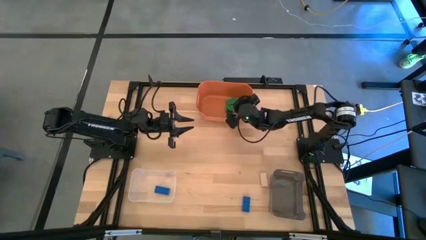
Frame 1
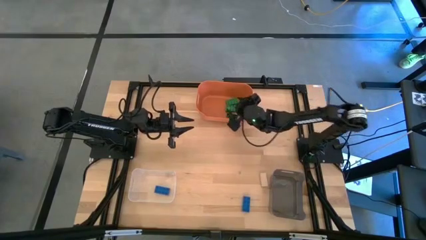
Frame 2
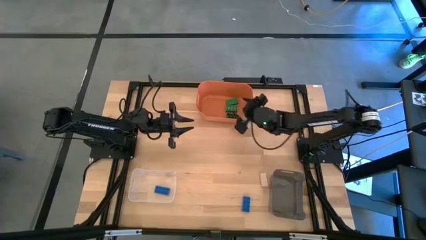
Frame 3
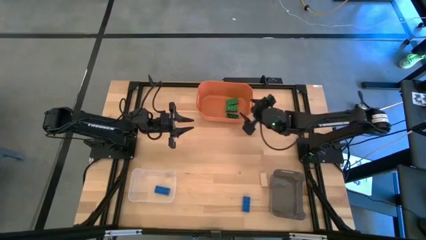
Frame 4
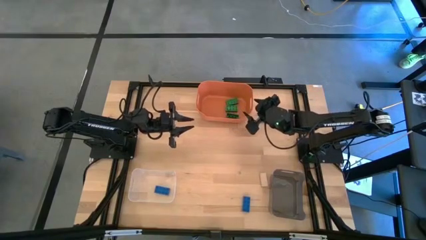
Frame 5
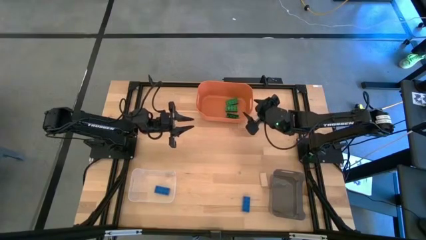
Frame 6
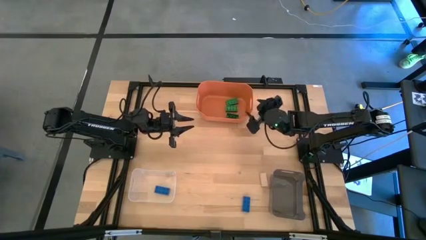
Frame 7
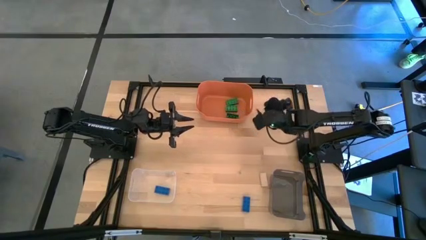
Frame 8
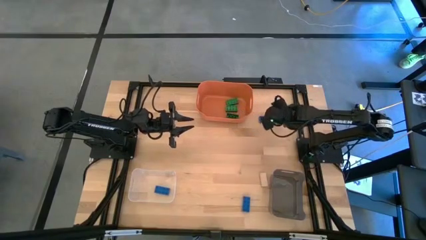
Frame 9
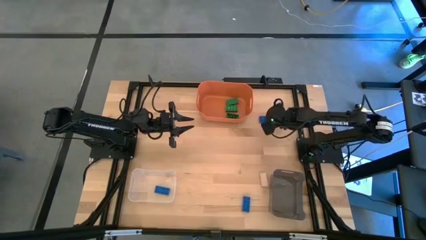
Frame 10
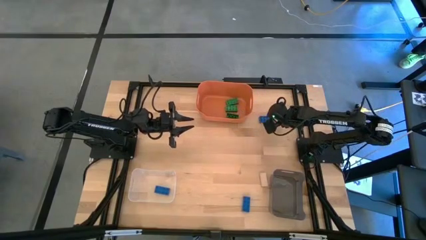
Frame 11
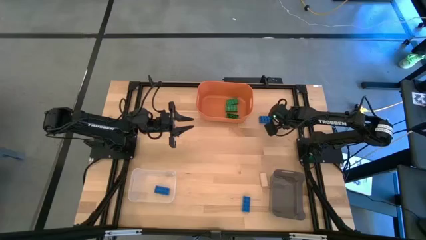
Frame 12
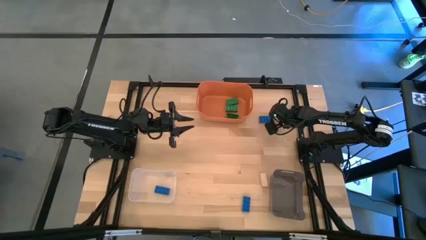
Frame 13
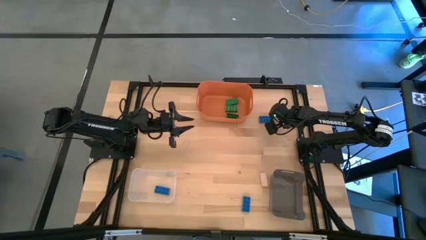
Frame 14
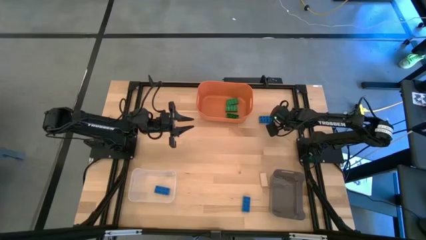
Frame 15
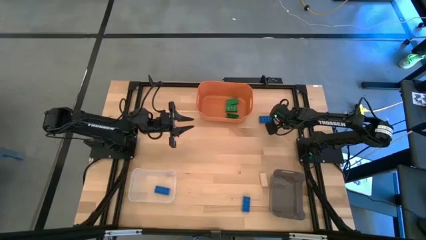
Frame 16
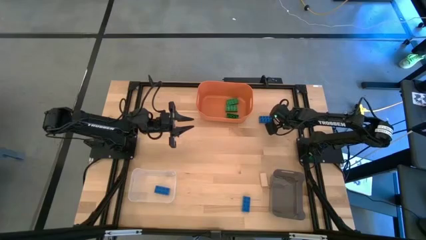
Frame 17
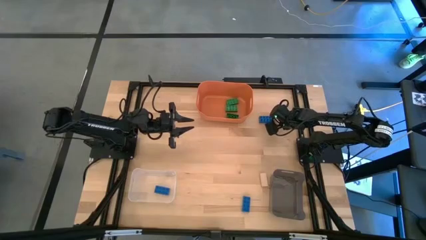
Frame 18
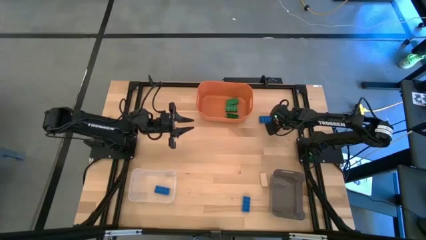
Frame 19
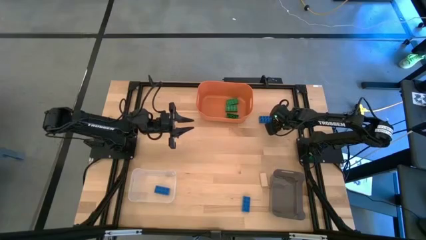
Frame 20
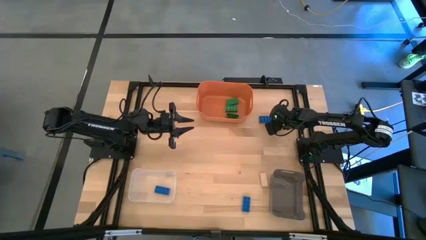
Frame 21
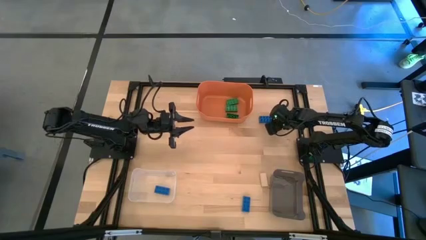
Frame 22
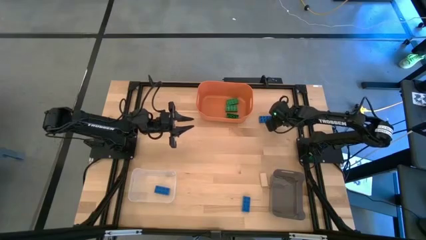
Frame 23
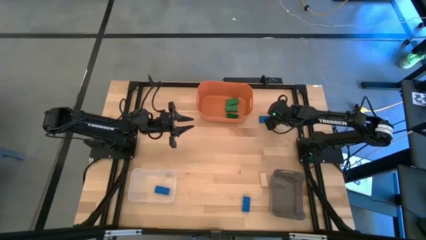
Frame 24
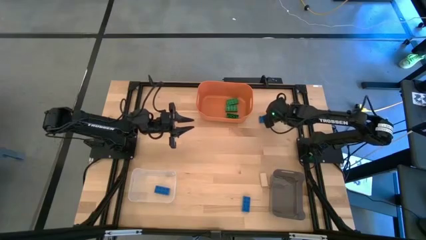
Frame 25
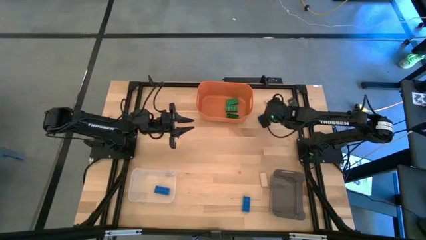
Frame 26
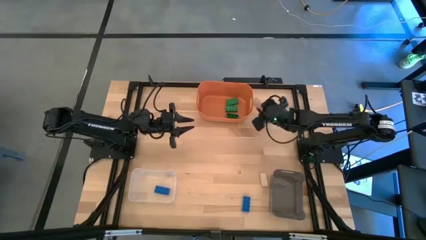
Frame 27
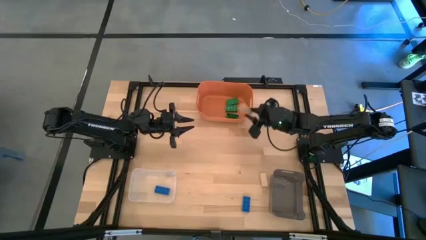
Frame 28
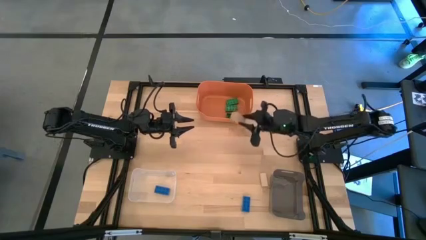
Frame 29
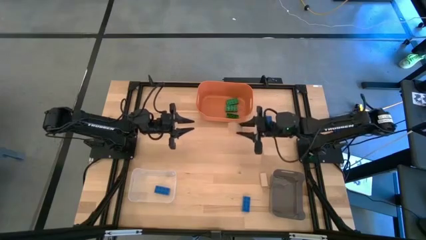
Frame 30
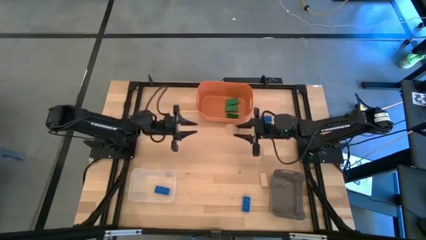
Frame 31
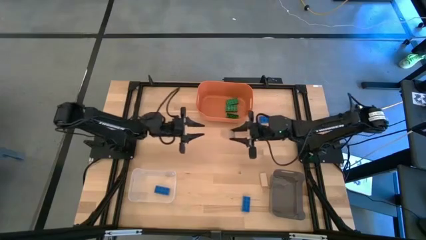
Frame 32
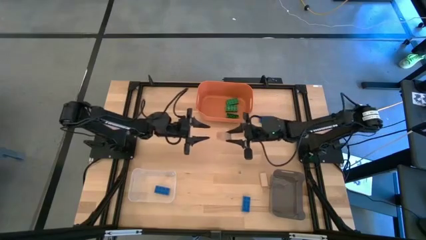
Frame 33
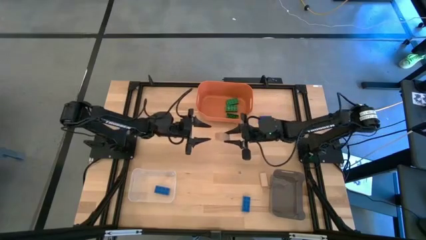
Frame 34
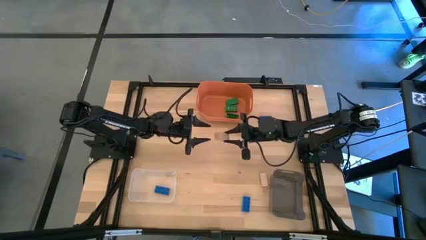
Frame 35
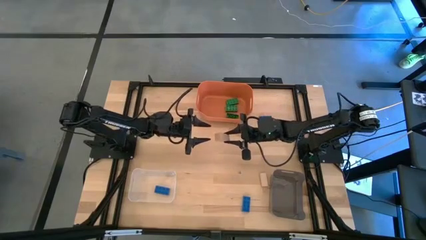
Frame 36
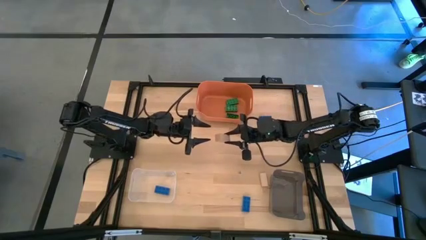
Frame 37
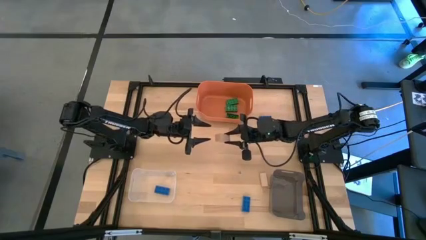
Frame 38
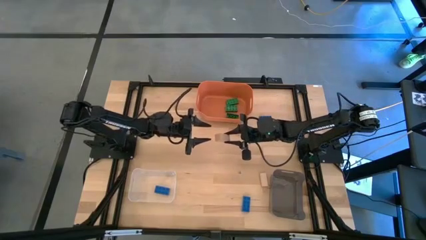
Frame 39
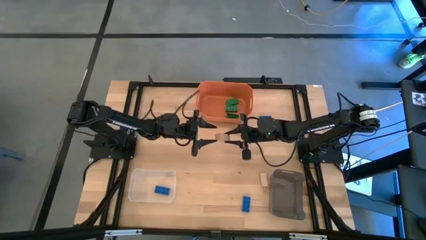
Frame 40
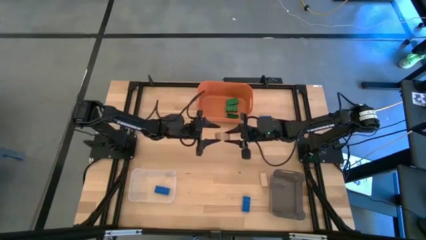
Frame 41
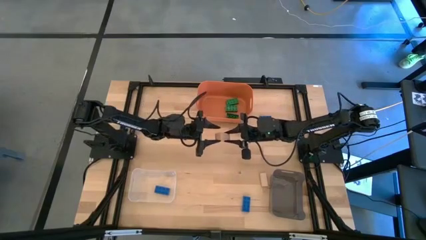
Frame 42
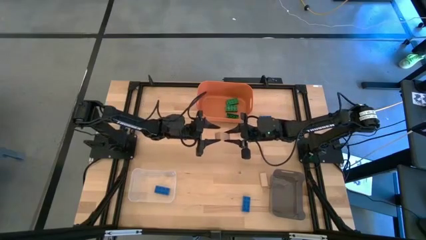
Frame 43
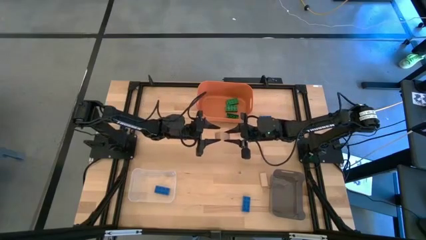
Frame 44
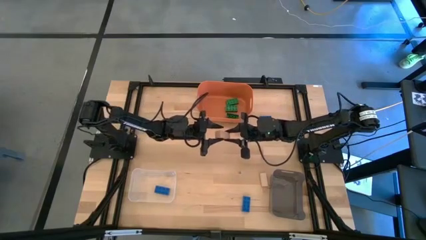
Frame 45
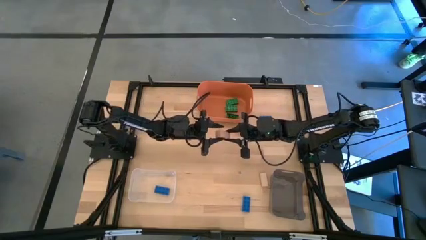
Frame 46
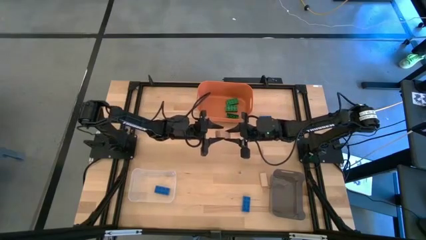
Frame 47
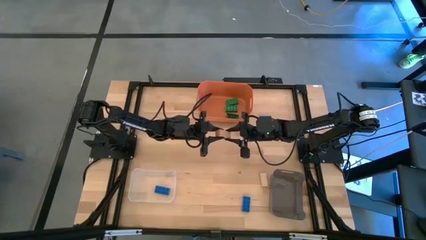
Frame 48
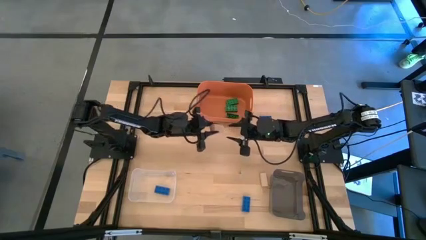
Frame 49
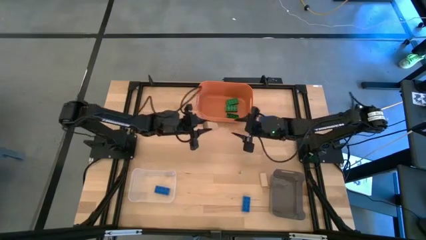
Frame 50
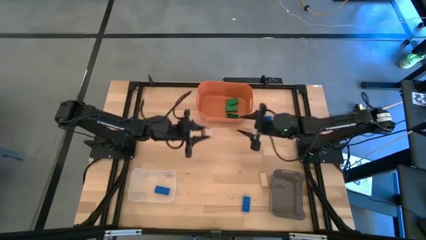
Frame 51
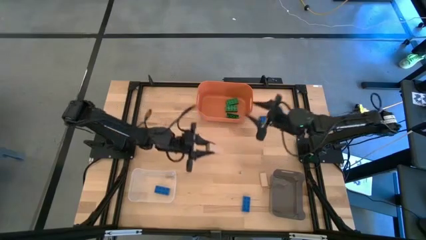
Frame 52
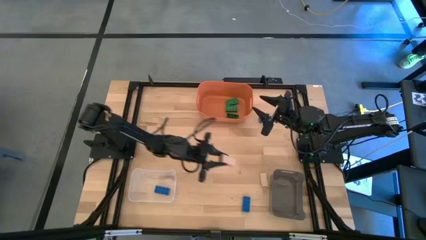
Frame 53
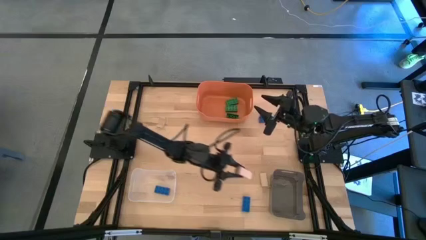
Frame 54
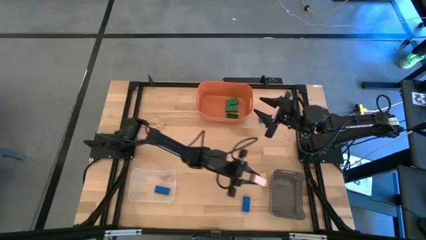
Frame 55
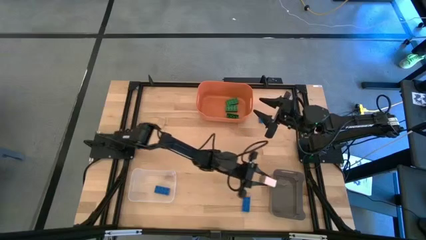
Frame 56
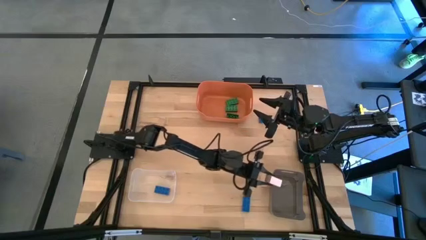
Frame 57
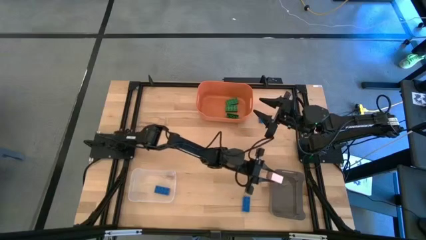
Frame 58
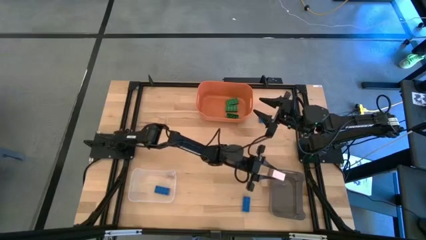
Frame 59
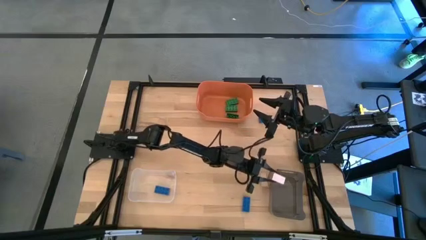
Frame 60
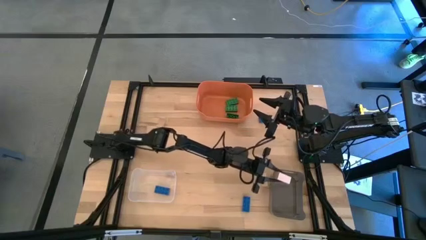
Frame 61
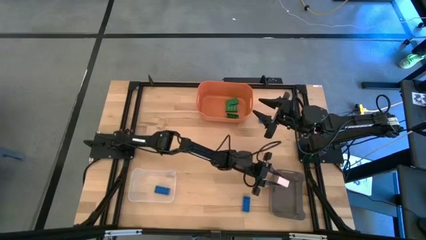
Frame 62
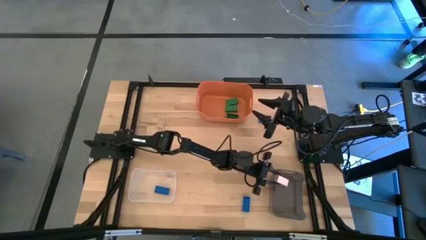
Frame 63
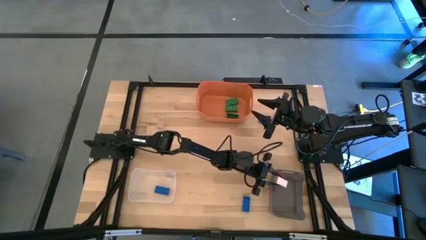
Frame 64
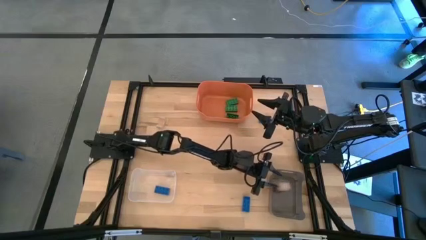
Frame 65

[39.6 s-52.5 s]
Task: Sort & place blocks by color
Put the top right brown block into the black transparent bin

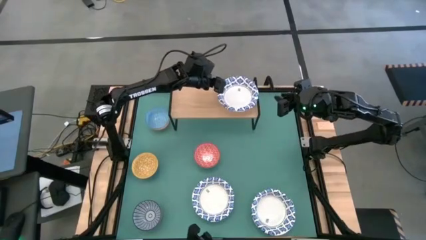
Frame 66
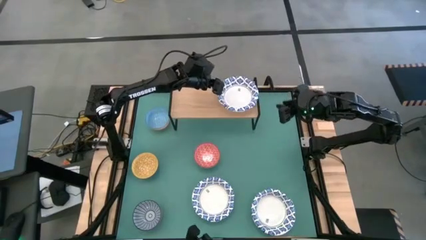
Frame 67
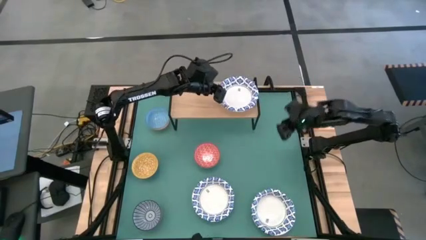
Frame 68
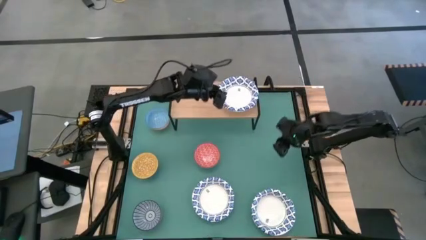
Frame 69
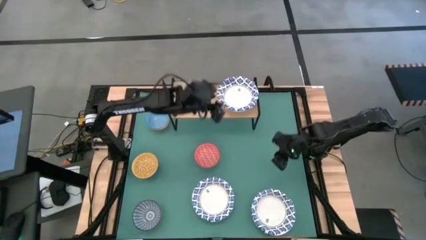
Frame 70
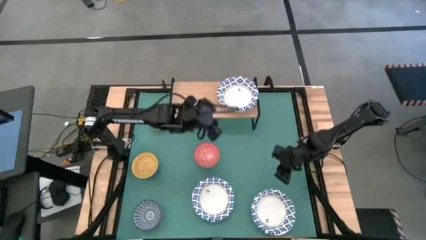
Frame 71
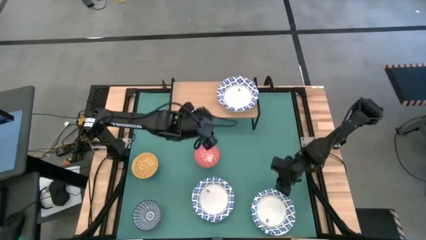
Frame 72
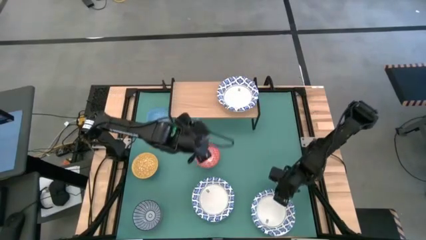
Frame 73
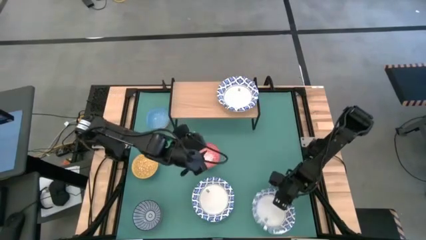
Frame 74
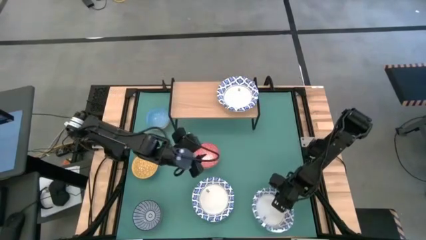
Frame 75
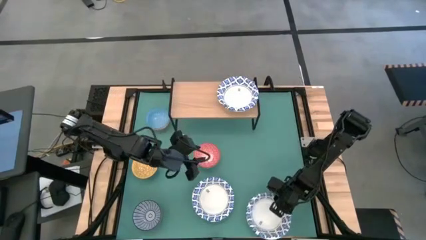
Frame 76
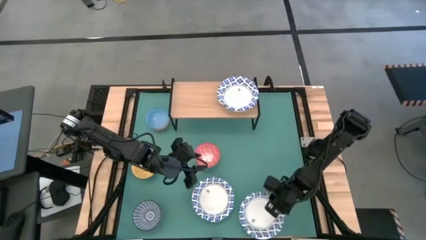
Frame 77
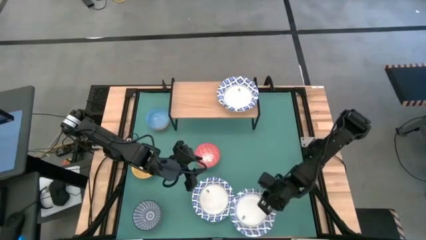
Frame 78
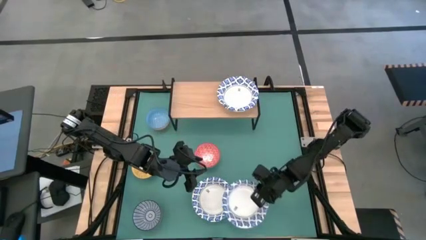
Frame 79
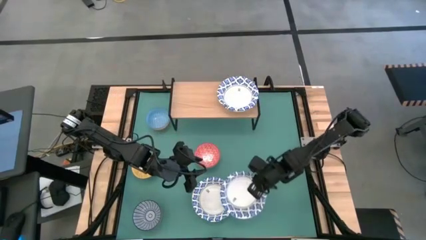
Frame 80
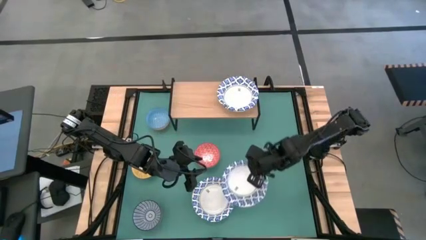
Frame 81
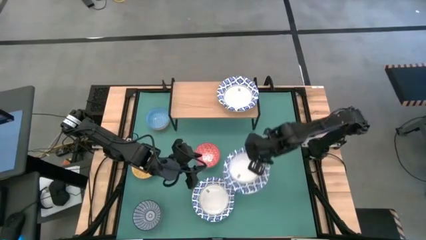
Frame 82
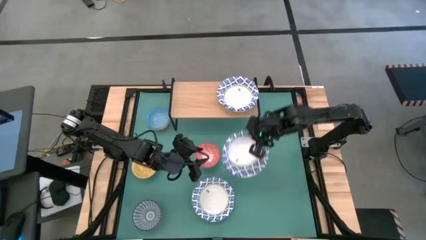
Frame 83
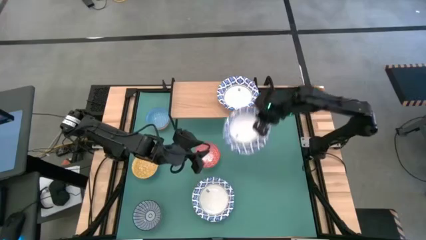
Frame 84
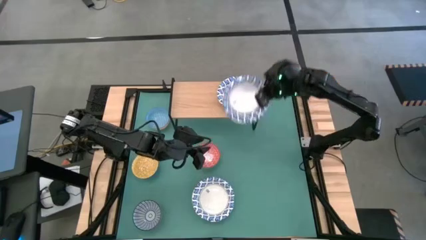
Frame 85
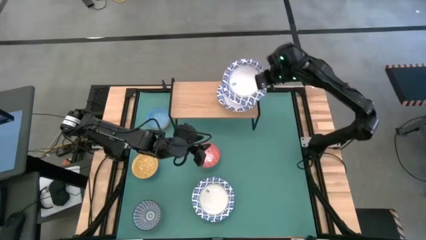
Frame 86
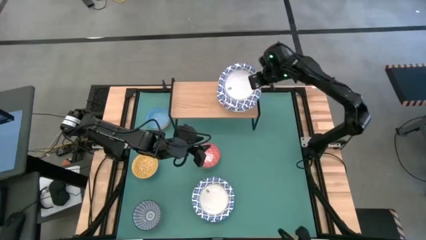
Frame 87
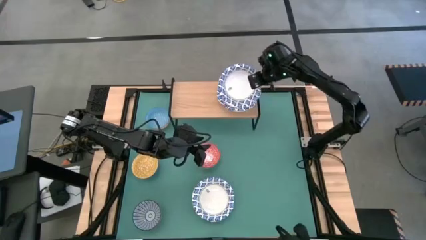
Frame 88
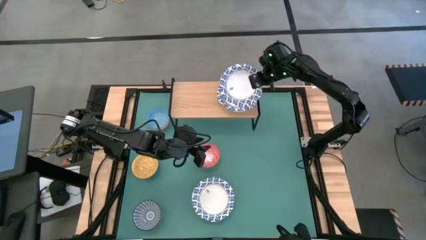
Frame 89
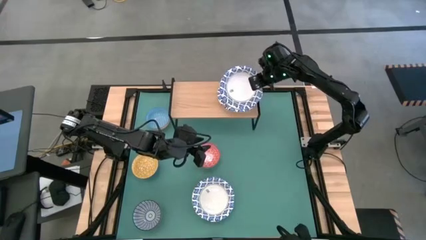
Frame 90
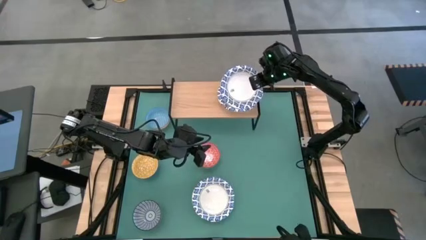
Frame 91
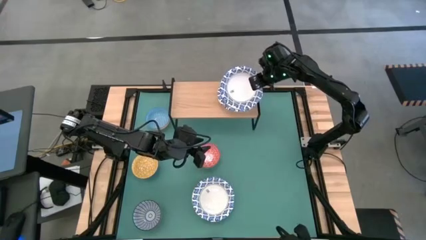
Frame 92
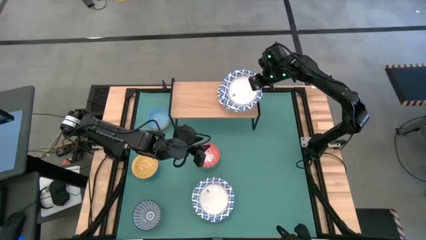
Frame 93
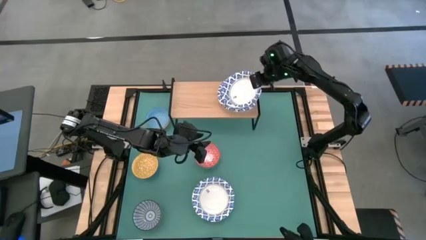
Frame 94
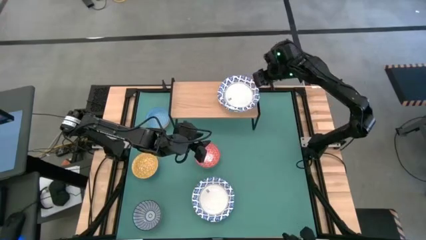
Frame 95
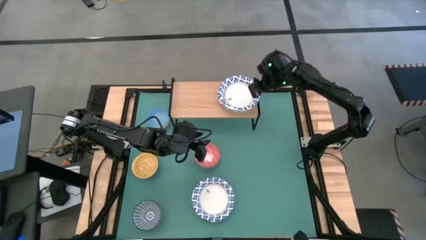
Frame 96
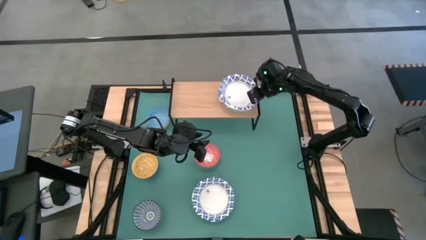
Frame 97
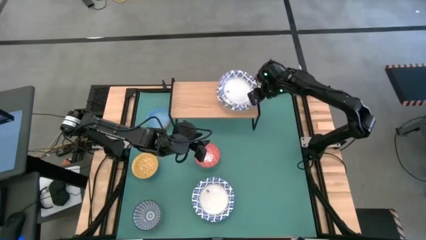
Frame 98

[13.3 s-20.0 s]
Task: Place and stack bowls onto a shelf
Stack the white patterned bowl on top with the other white patterned bowl on the shelf
